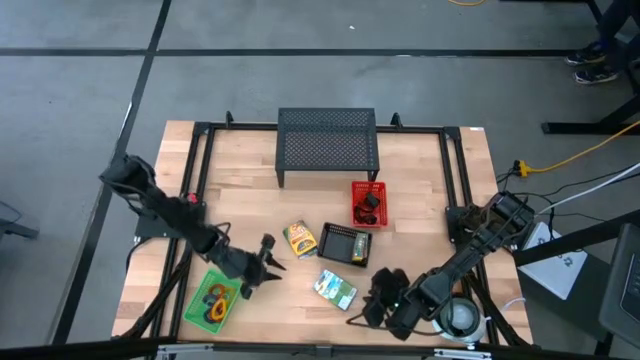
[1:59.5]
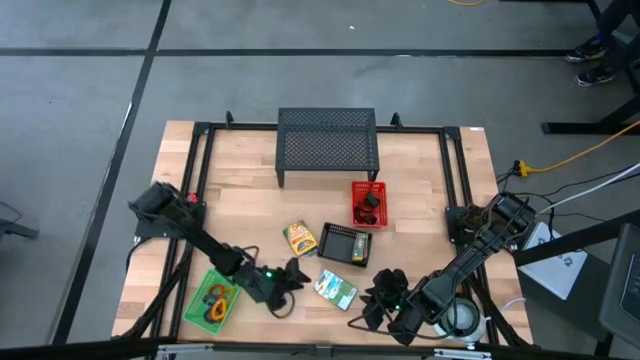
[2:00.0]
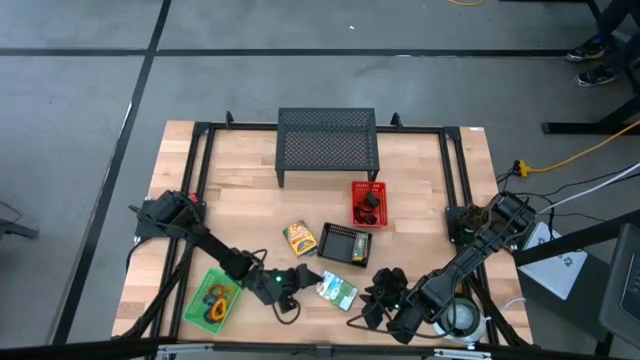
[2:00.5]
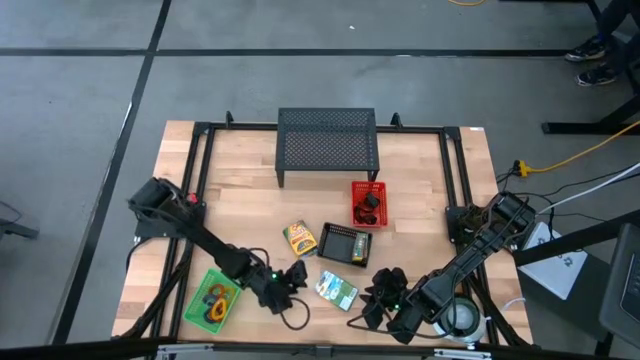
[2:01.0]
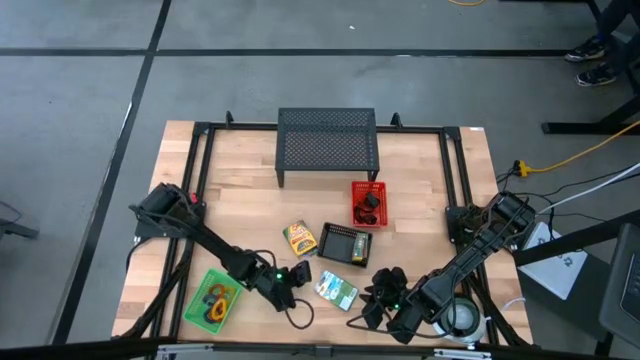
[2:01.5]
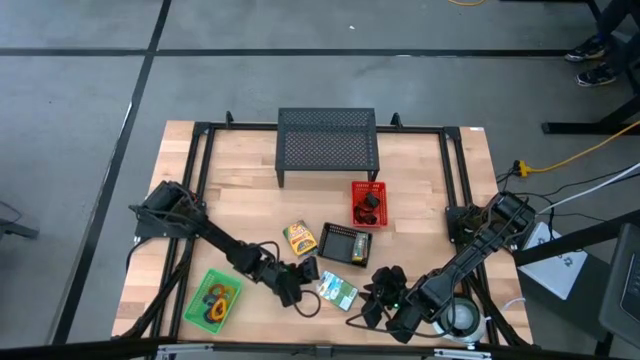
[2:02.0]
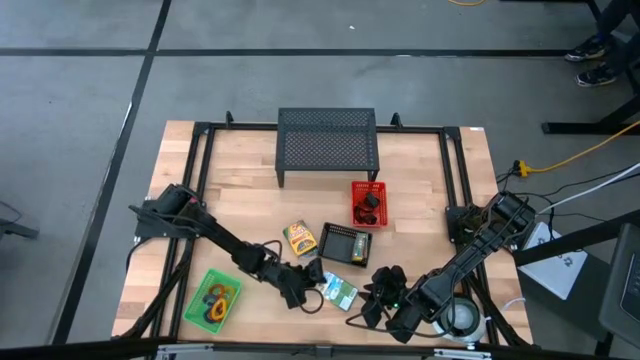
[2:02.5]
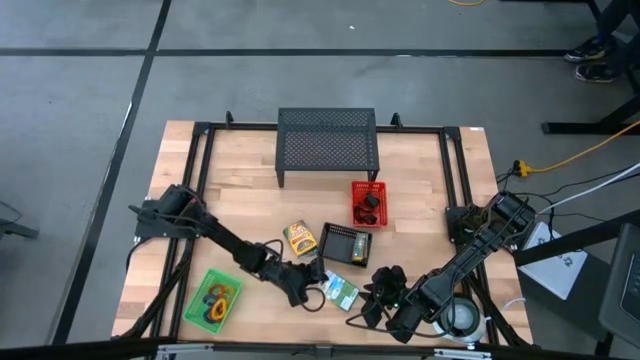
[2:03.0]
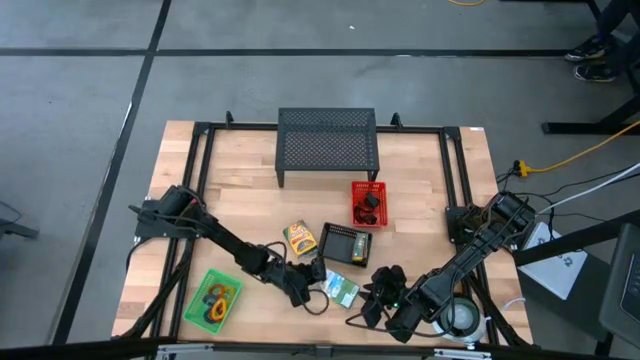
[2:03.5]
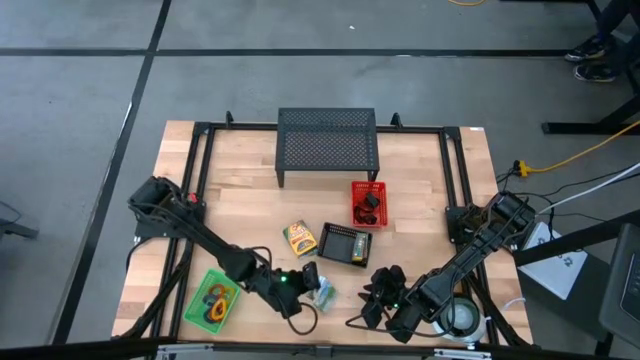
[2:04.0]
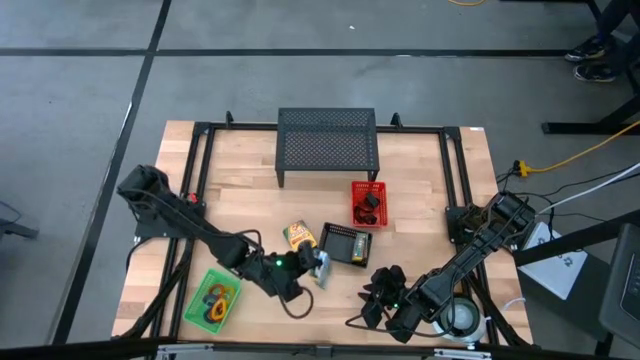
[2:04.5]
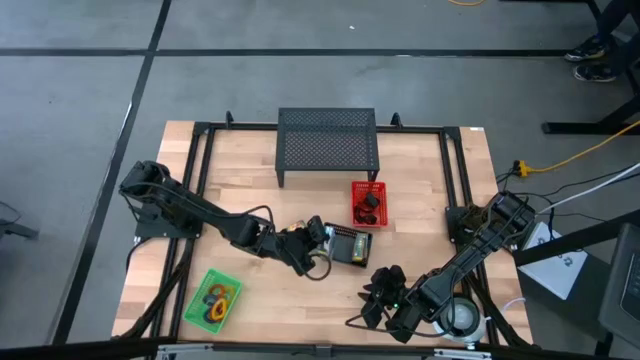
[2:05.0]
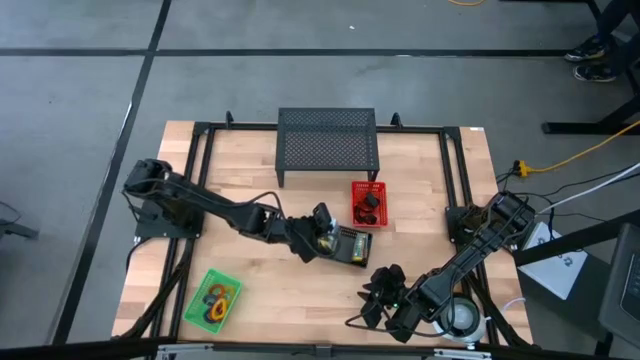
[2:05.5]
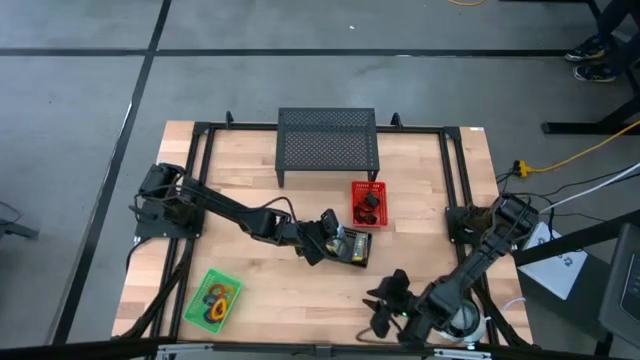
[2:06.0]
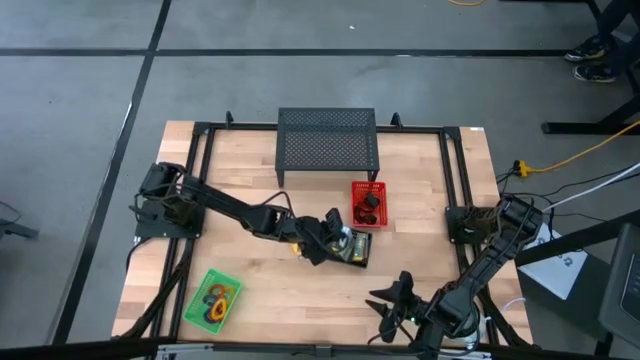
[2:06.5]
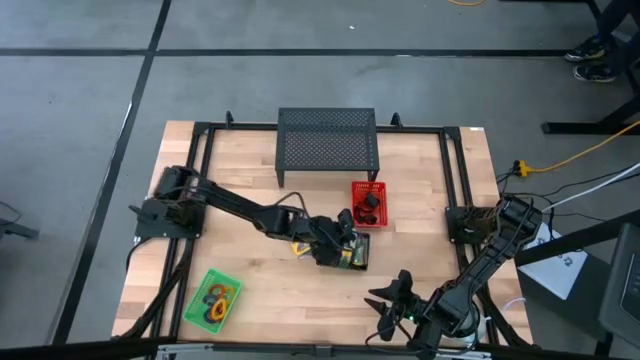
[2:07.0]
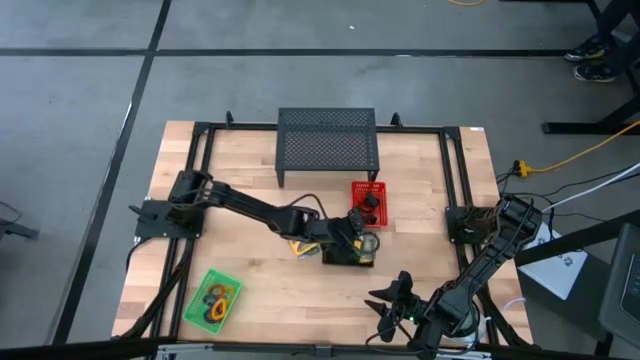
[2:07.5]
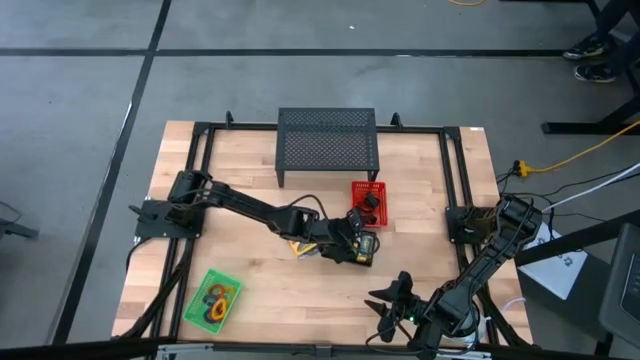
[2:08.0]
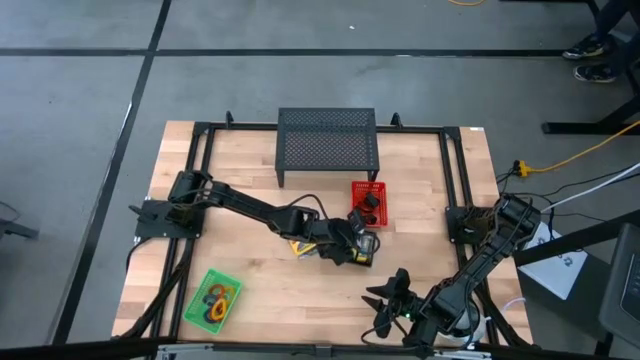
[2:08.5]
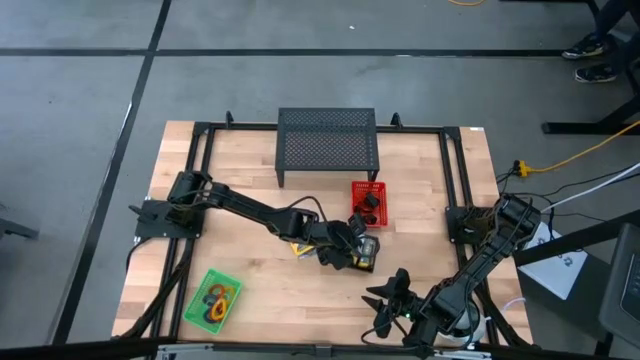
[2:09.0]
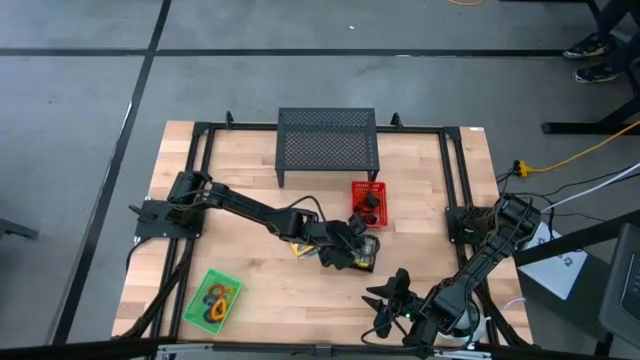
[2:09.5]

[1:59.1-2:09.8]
Task: Pick & Place Office Desk Supplies
Put the crayon box into the black bin

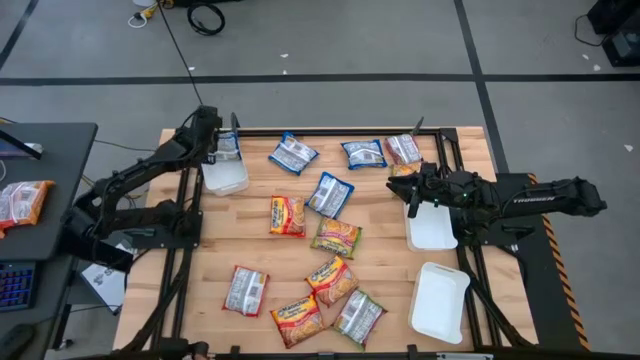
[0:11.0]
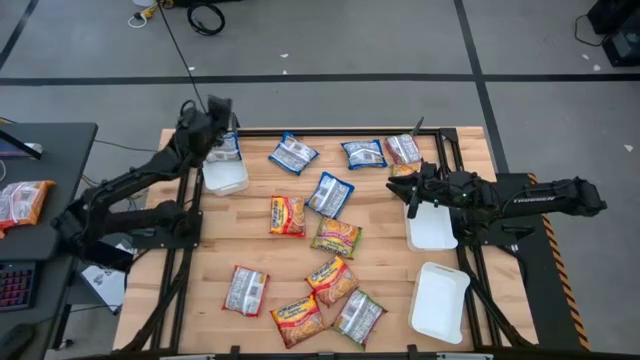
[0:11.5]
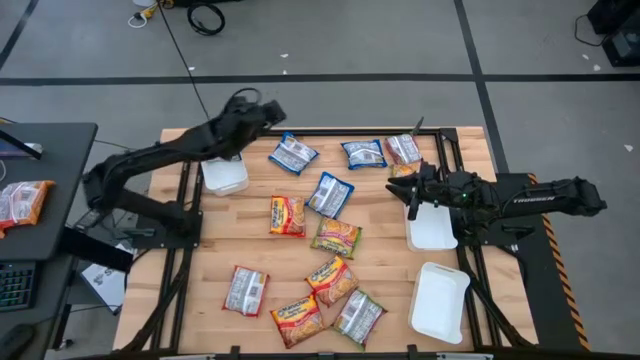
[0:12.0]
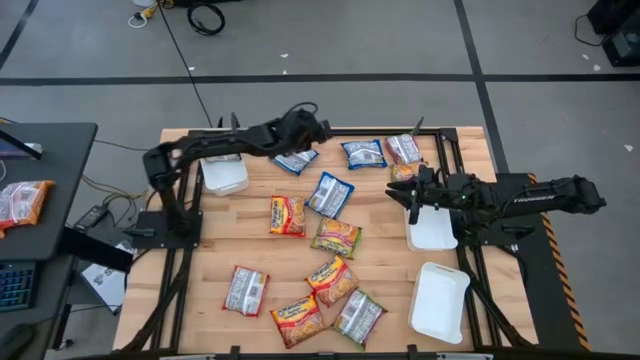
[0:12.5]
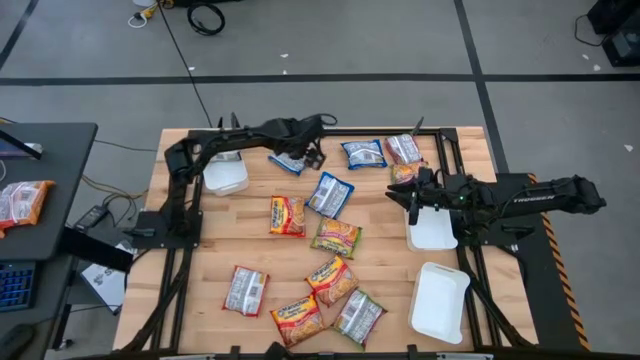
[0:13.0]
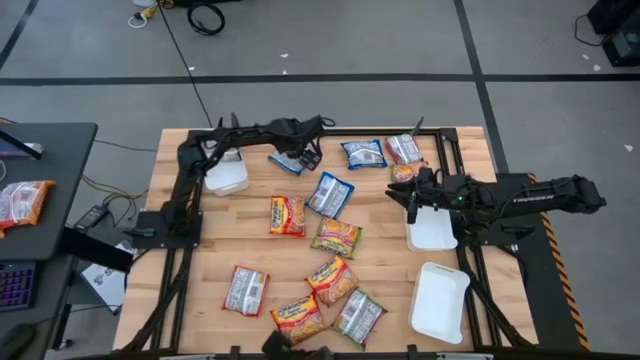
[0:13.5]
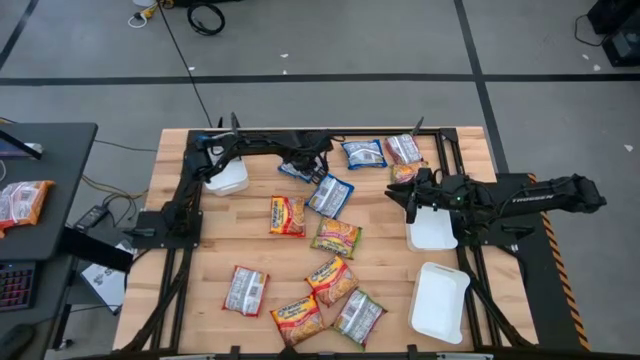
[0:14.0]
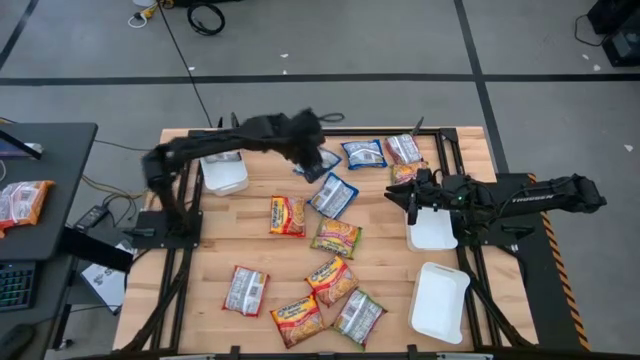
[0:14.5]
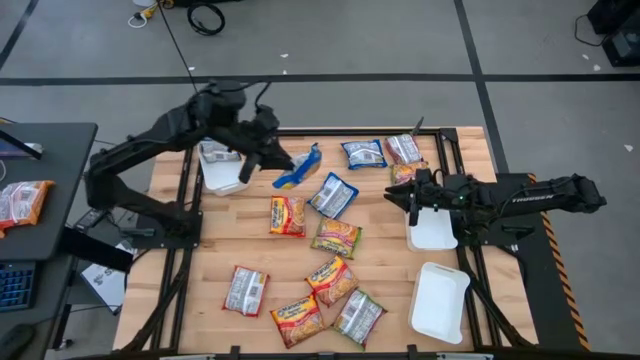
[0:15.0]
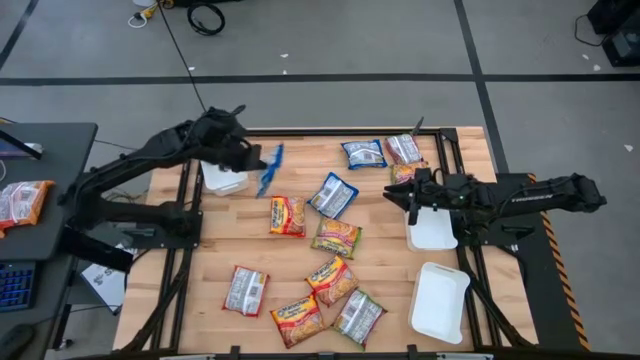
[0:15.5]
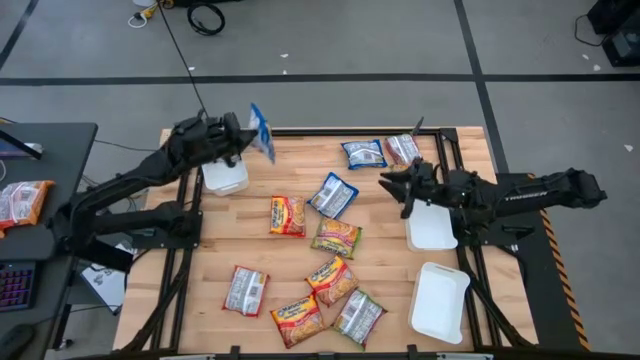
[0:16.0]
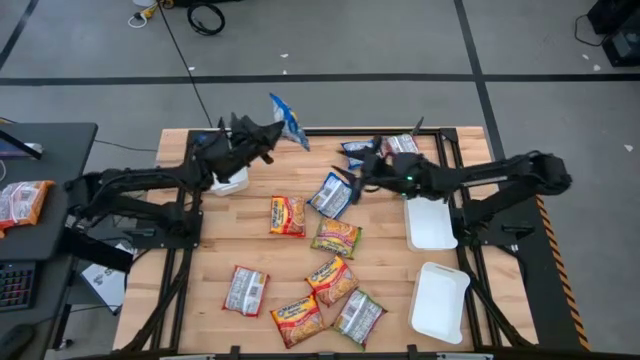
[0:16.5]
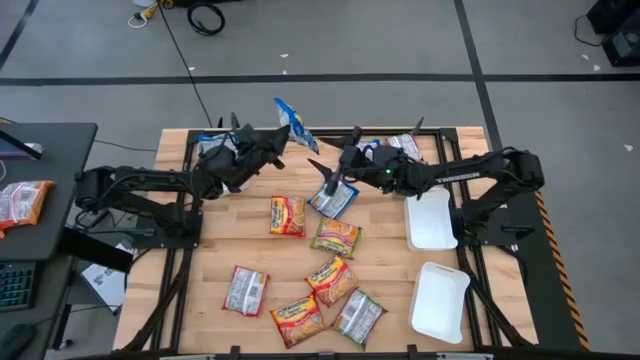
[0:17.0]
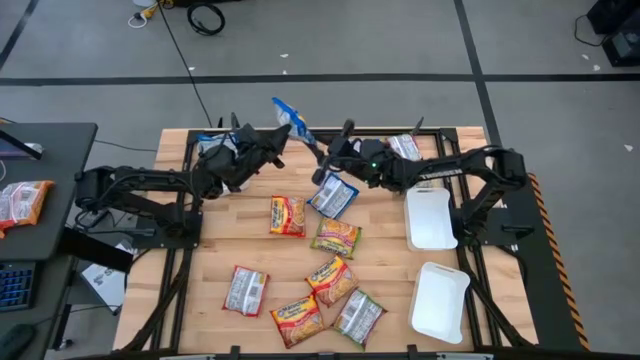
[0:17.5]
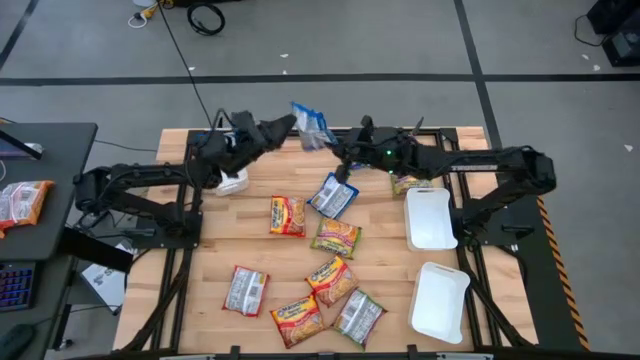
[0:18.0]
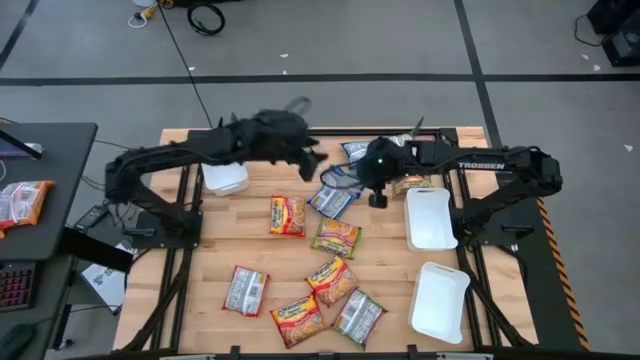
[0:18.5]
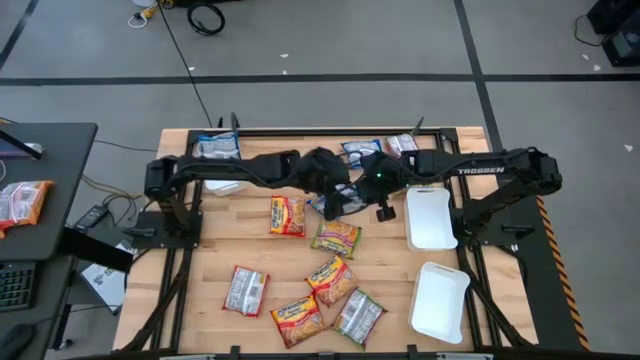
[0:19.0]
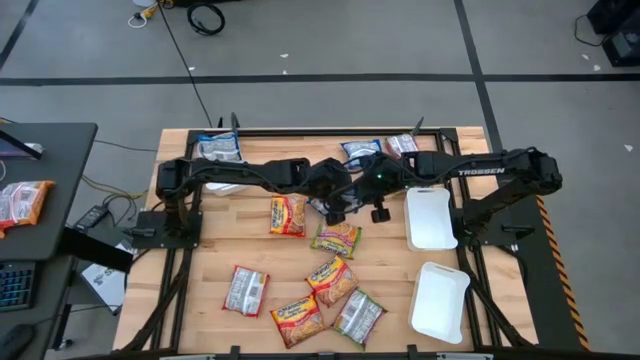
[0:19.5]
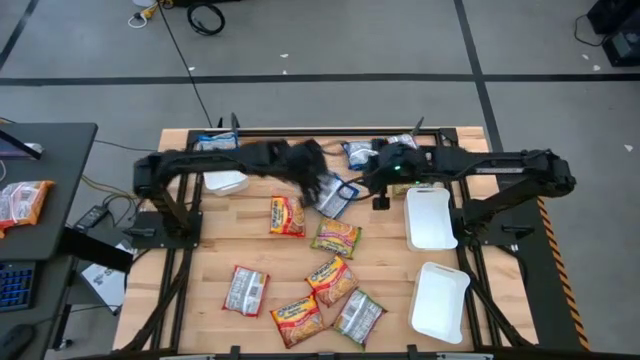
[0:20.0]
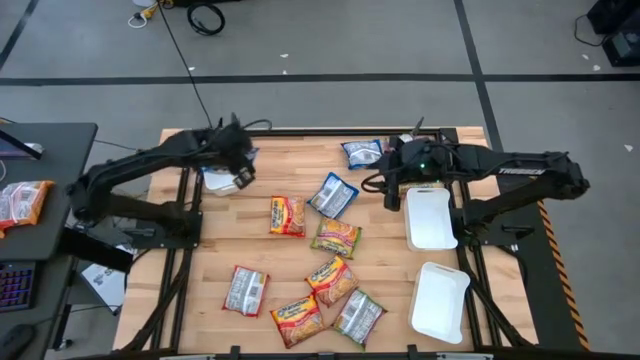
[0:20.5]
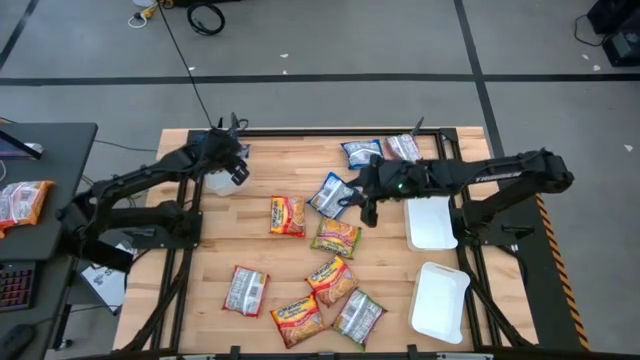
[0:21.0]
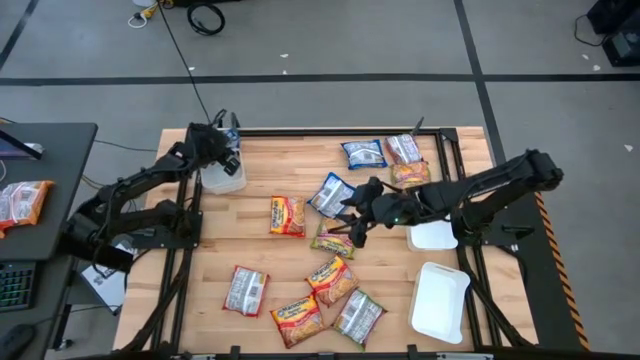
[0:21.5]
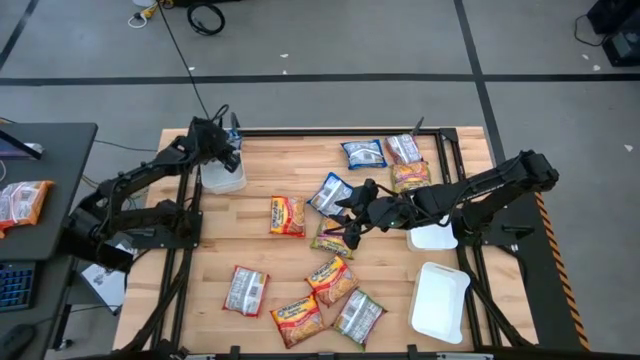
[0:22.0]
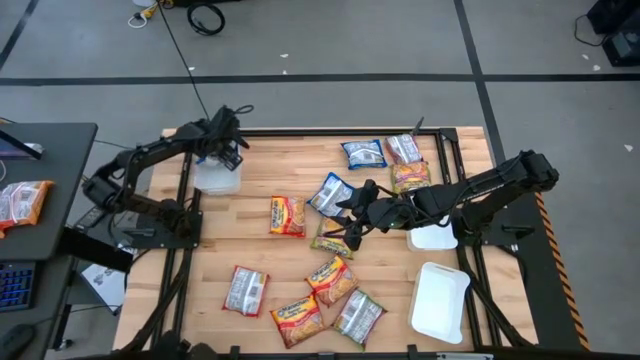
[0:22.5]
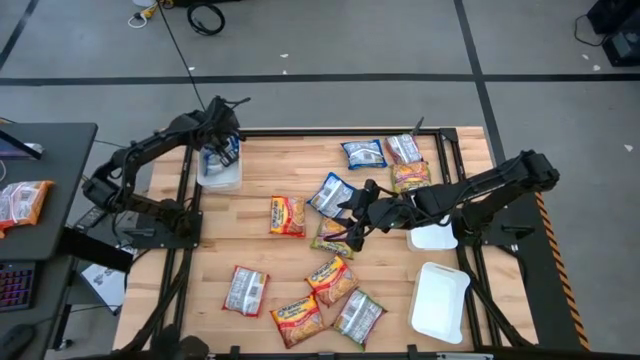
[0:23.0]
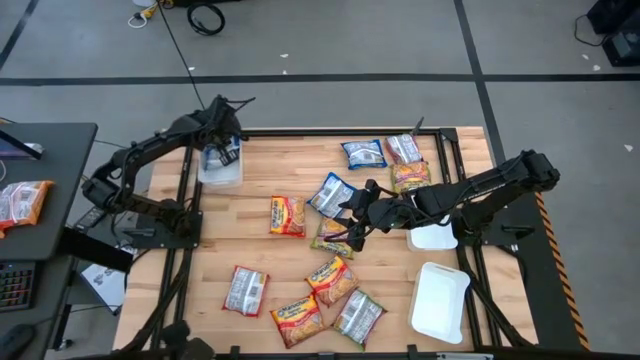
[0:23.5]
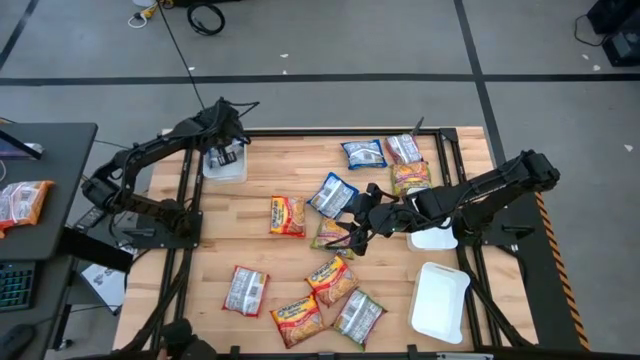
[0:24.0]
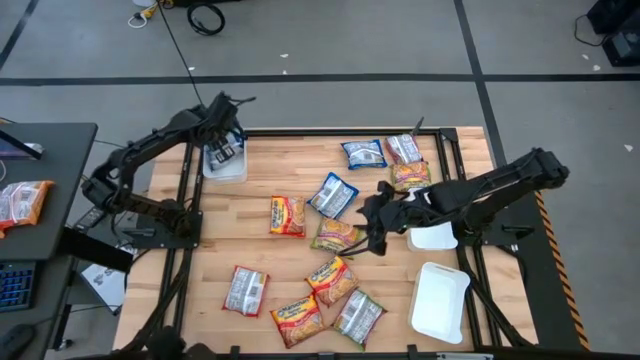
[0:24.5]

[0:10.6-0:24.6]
Task: Sort Maruchan noodles
Put the blue noodle pack into the top left white bin
